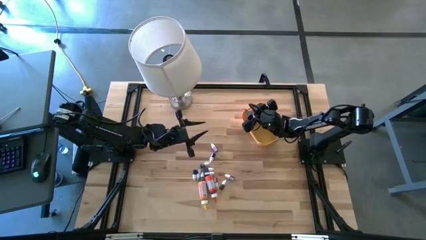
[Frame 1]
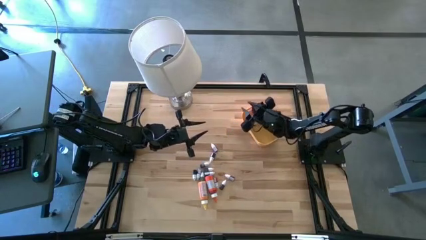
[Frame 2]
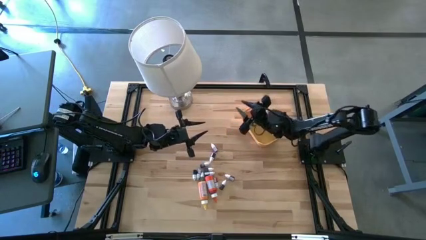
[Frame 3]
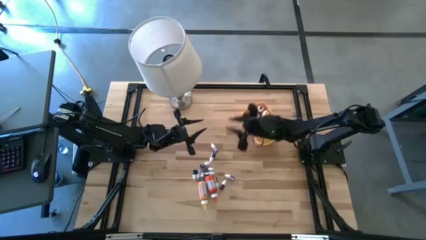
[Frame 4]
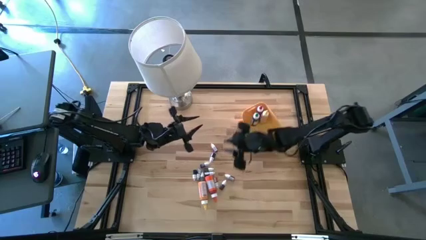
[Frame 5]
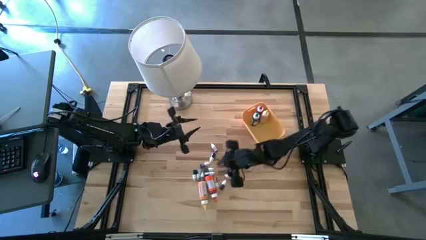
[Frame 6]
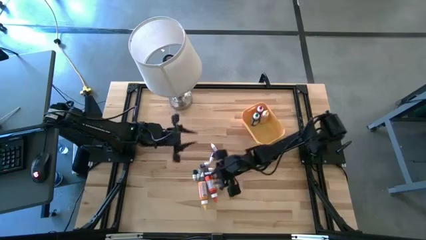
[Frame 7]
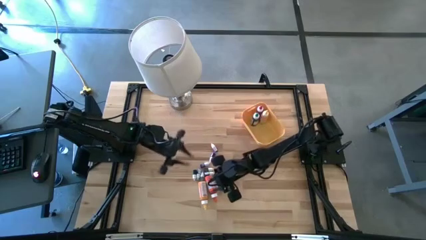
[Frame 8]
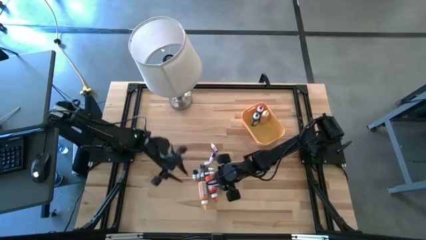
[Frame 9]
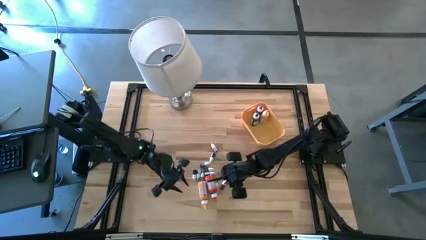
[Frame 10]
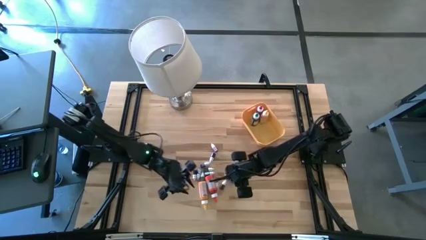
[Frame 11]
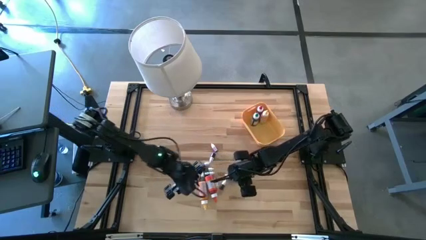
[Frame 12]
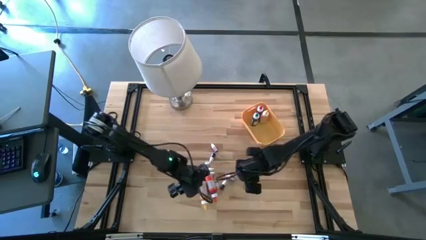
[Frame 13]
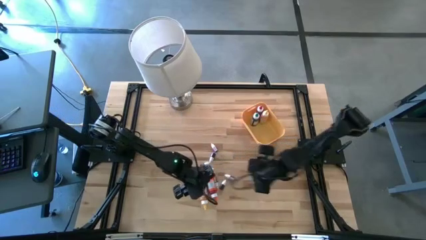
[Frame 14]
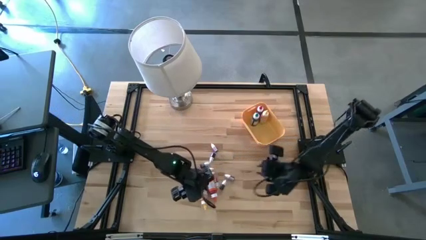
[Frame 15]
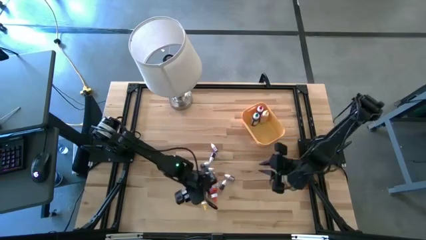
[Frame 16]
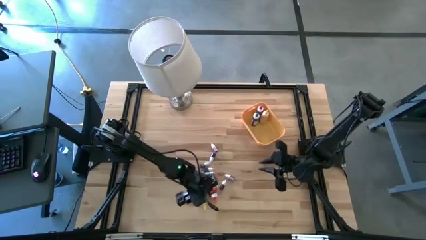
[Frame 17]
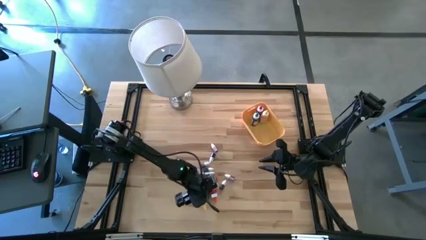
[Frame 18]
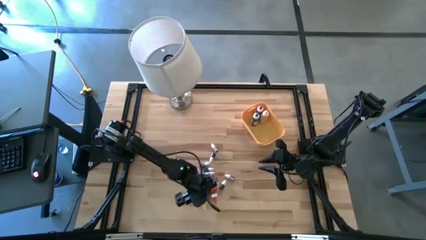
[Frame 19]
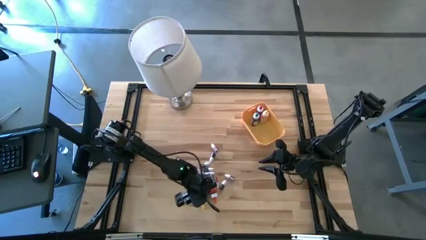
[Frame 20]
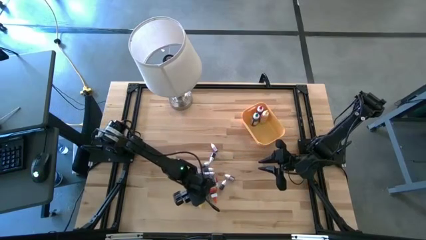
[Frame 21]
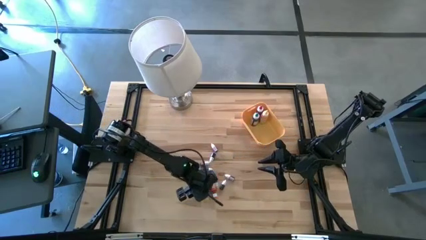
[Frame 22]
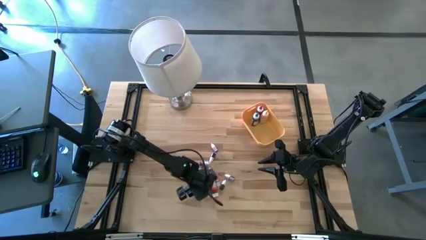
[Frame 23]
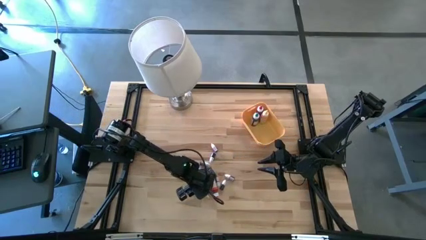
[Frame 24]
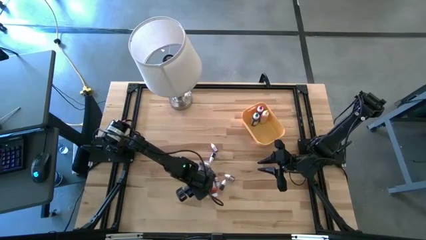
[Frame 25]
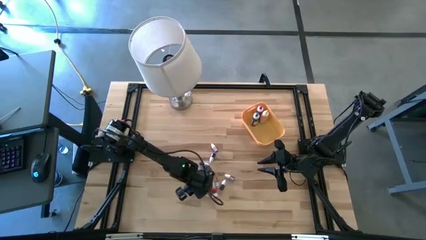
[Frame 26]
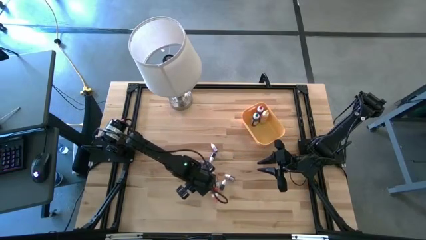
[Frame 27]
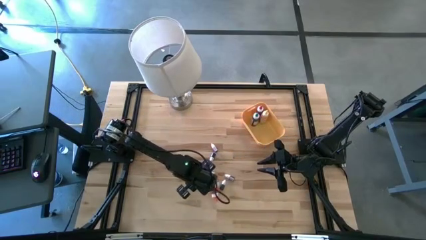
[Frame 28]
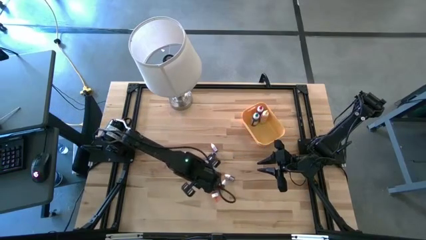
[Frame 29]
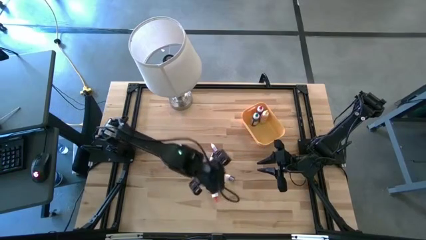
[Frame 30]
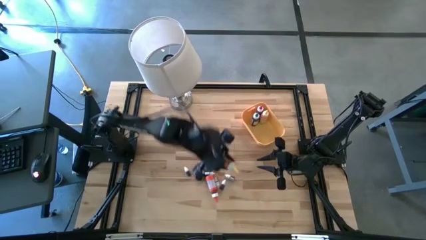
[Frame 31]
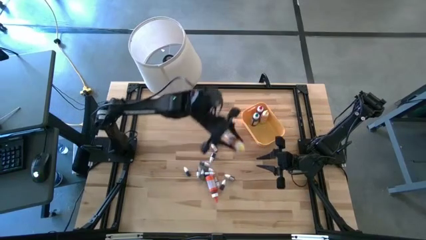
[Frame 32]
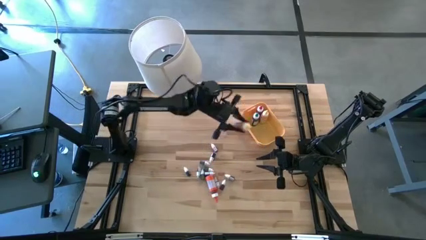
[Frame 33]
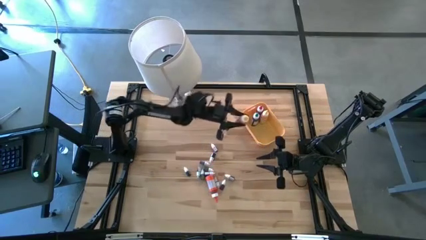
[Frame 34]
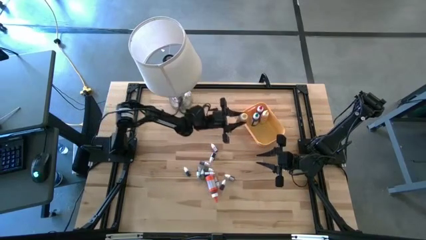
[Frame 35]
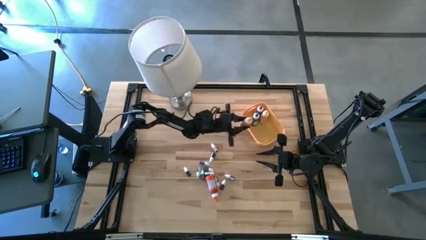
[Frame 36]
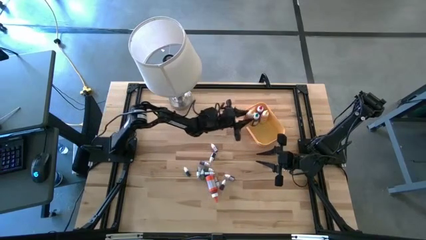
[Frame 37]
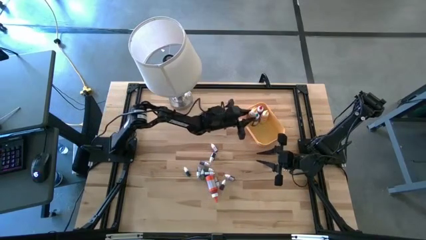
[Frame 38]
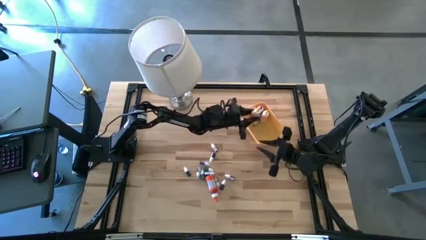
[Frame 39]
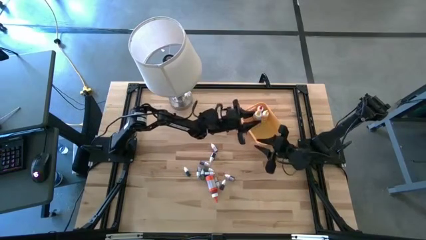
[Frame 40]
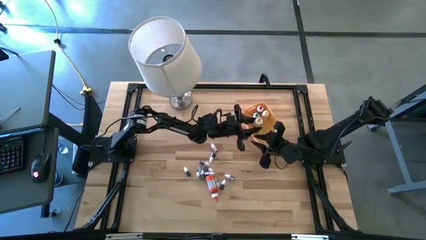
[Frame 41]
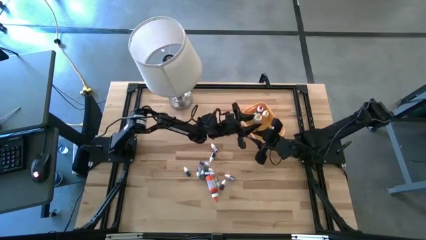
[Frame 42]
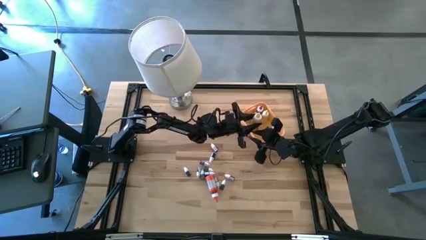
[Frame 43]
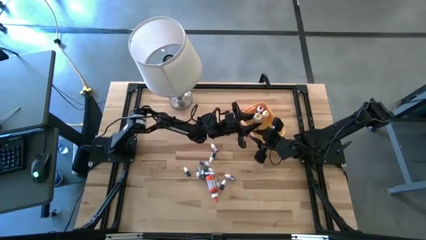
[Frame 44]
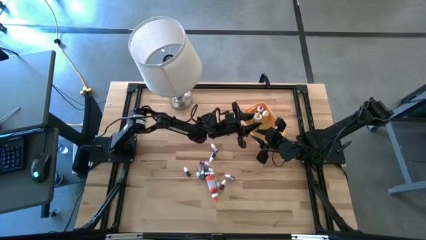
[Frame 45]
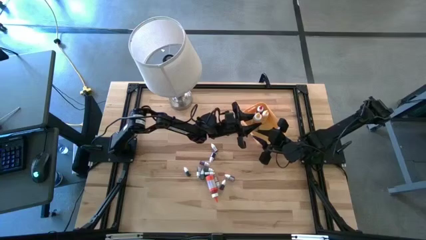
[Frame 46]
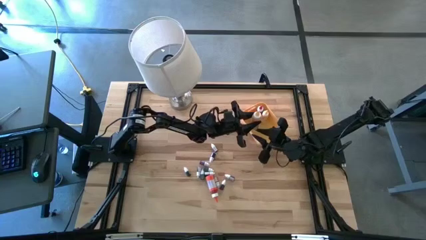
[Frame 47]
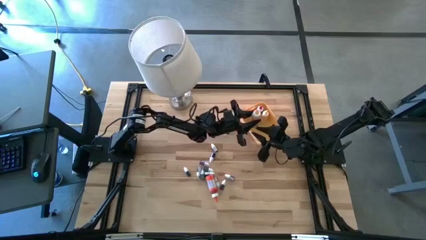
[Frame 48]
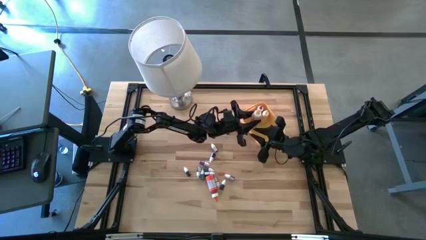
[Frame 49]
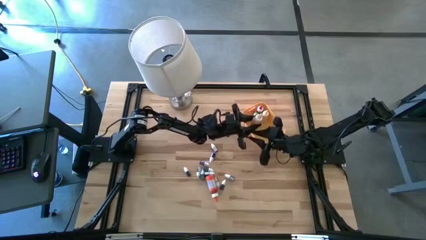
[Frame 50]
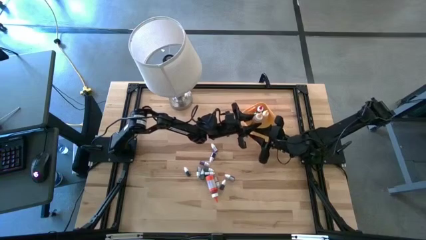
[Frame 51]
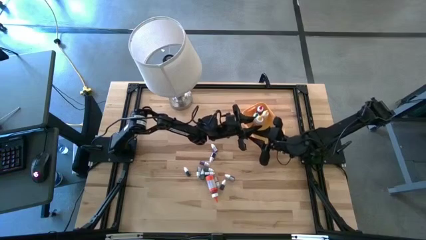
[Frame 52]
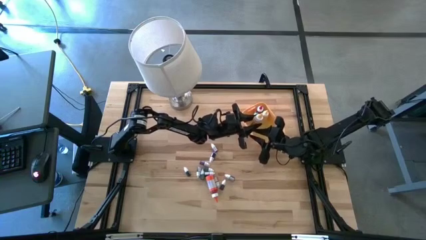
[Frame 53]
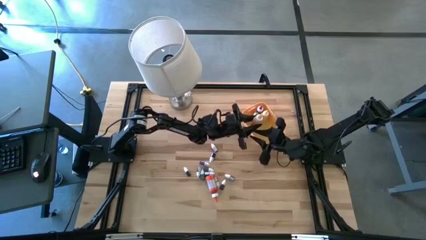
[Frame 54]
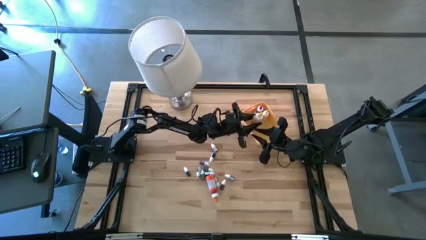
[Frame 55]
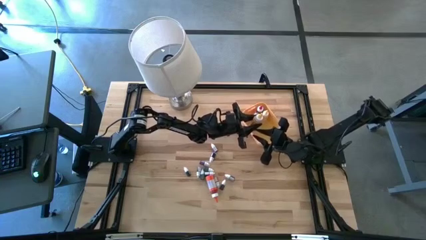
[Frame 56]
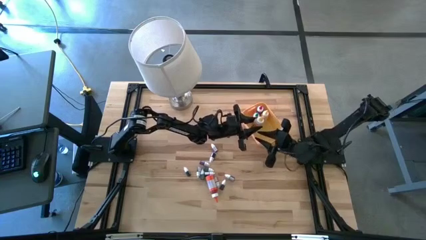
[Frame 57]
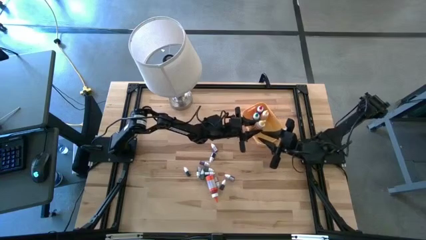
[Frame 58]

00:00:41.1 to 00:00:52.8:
Task: Pick & Place food coloring
Put the large yellow food coloring bottle into the yellow bin
